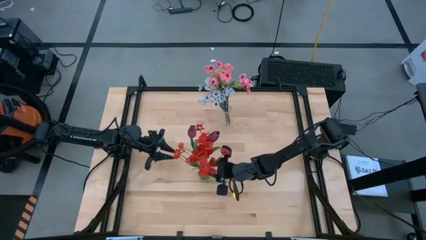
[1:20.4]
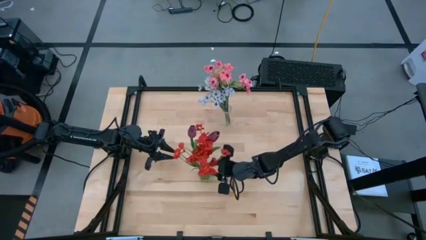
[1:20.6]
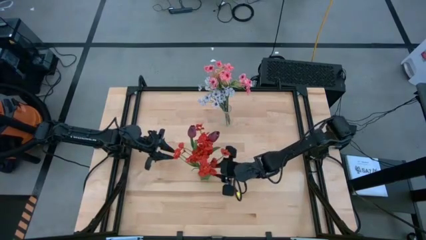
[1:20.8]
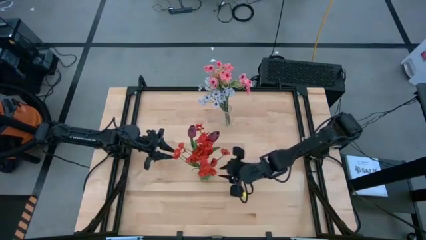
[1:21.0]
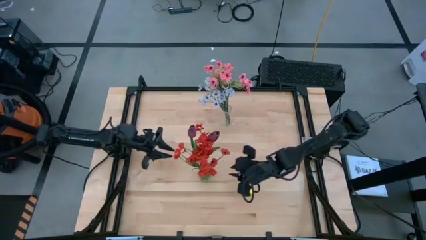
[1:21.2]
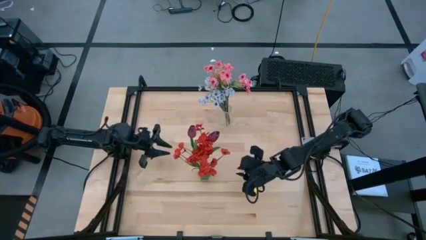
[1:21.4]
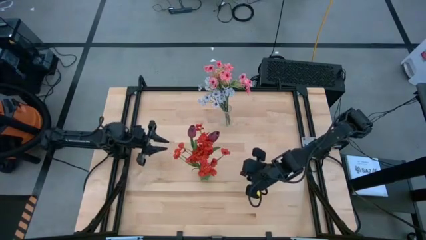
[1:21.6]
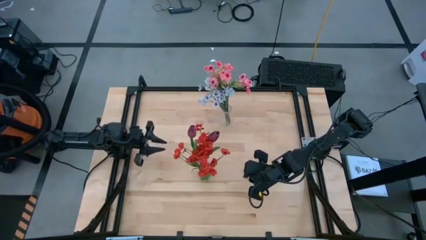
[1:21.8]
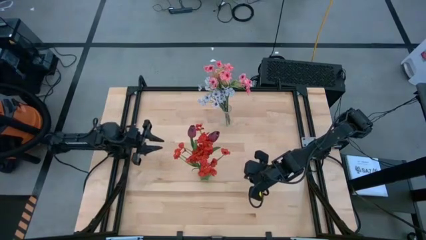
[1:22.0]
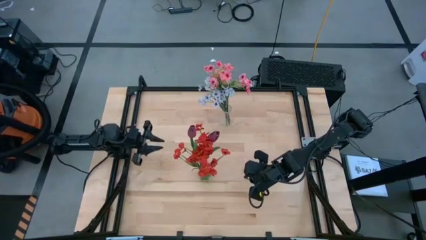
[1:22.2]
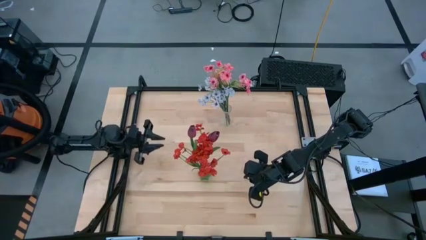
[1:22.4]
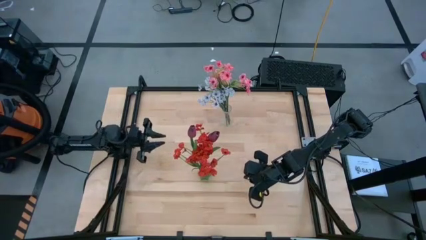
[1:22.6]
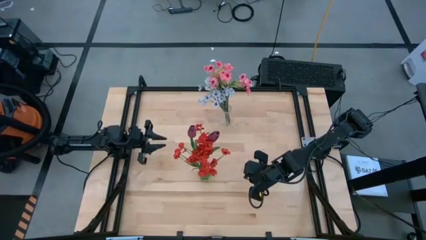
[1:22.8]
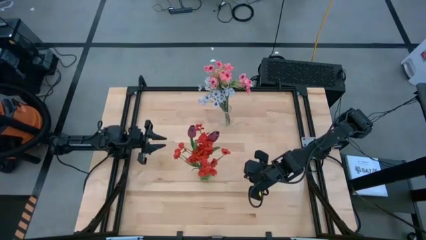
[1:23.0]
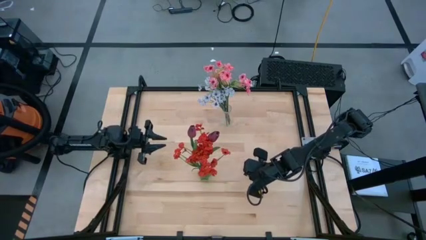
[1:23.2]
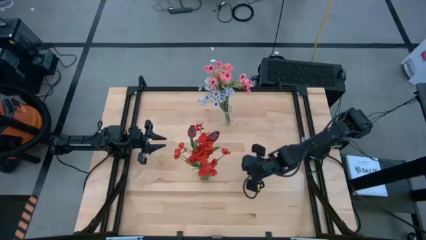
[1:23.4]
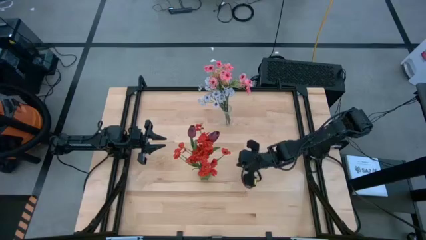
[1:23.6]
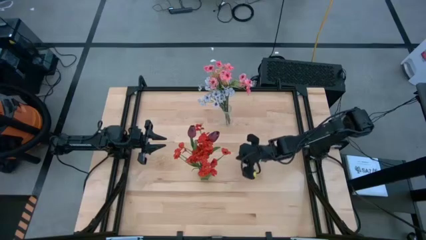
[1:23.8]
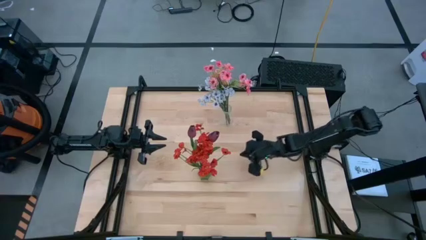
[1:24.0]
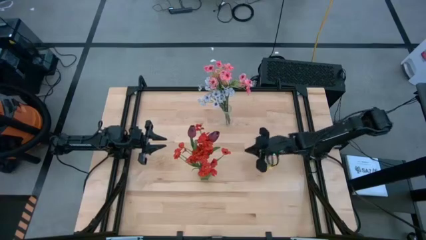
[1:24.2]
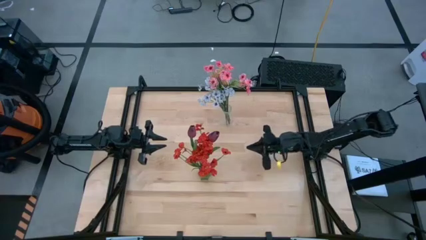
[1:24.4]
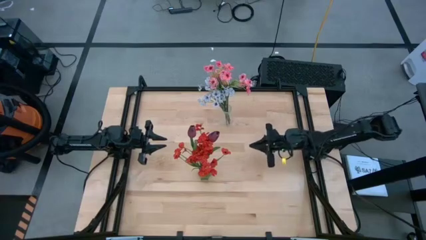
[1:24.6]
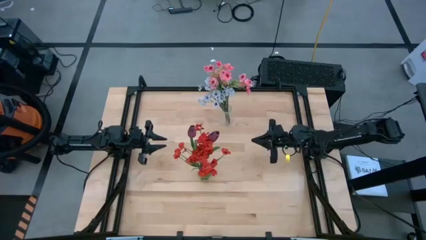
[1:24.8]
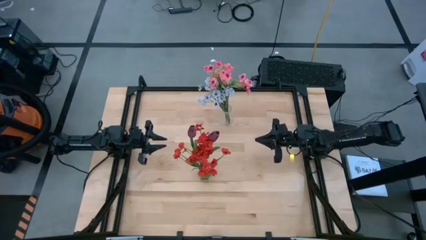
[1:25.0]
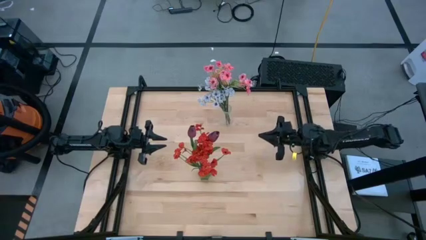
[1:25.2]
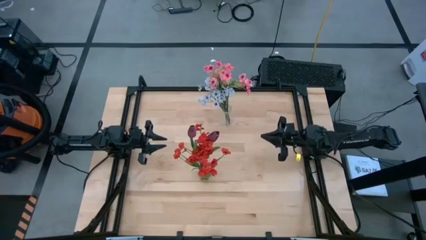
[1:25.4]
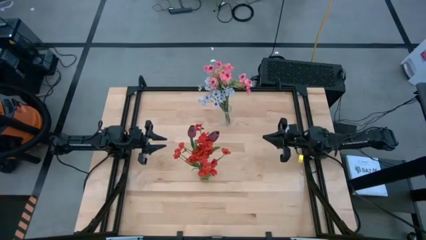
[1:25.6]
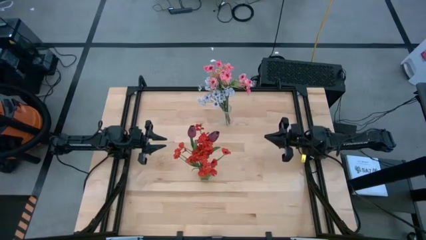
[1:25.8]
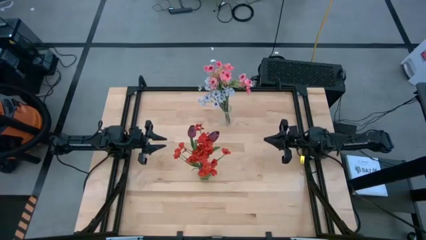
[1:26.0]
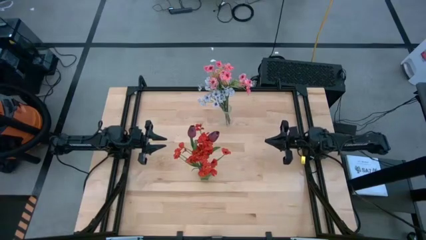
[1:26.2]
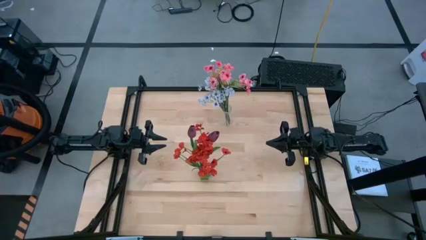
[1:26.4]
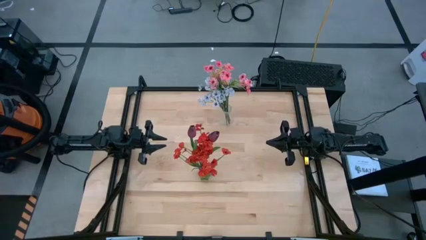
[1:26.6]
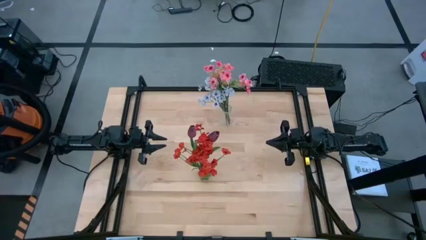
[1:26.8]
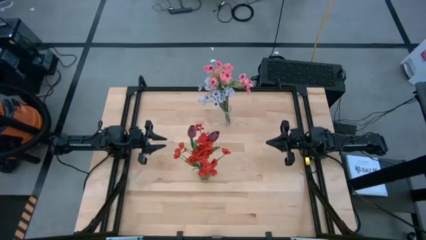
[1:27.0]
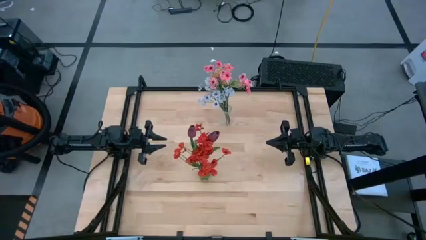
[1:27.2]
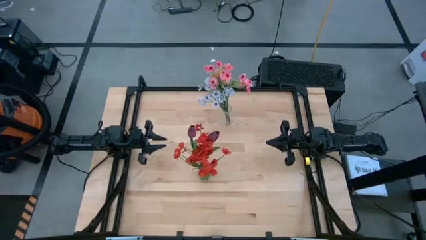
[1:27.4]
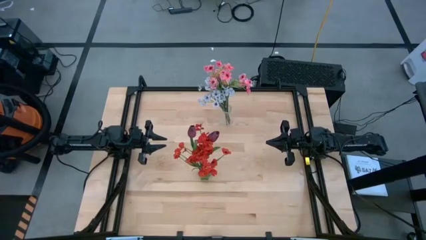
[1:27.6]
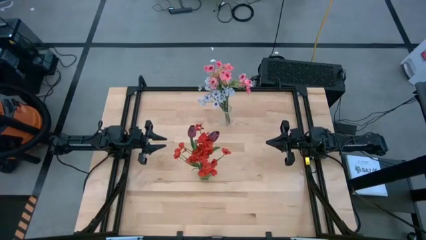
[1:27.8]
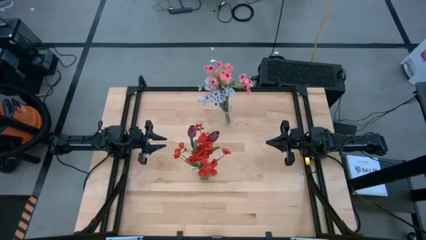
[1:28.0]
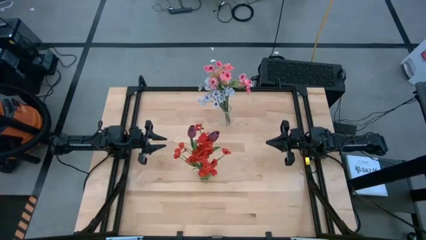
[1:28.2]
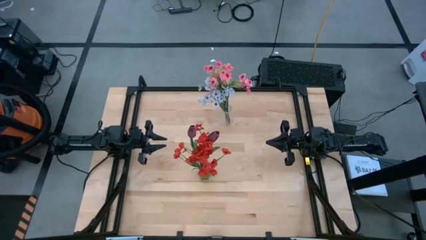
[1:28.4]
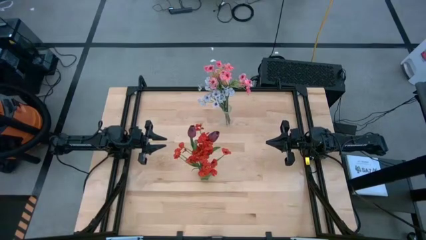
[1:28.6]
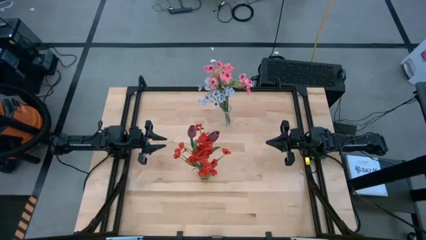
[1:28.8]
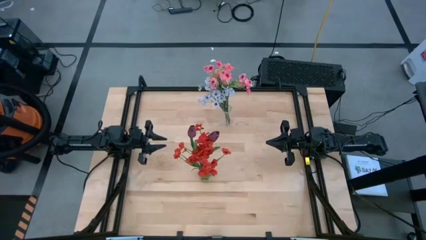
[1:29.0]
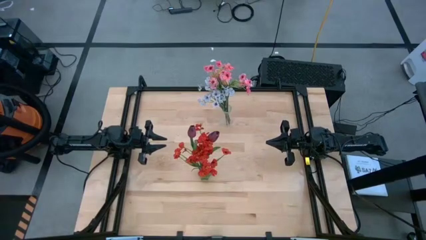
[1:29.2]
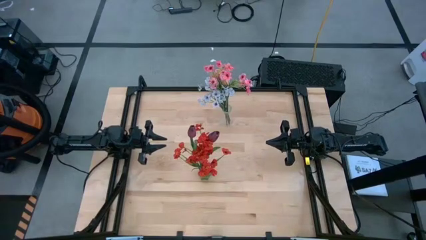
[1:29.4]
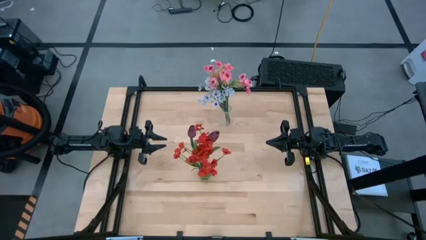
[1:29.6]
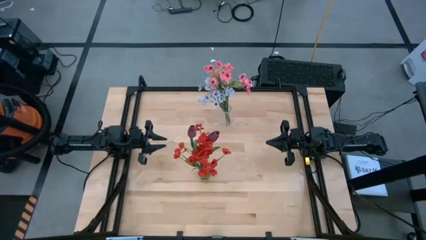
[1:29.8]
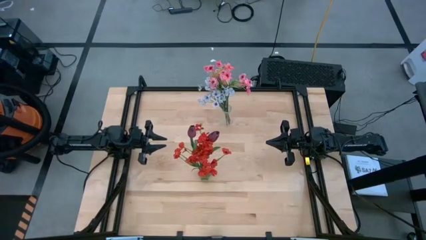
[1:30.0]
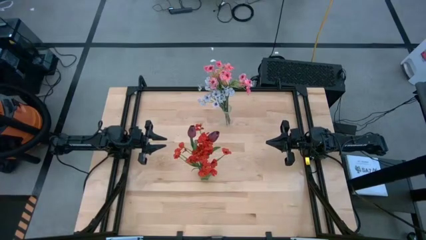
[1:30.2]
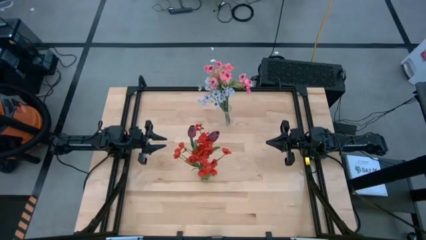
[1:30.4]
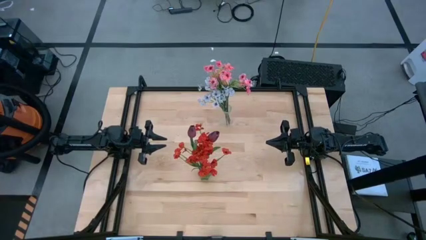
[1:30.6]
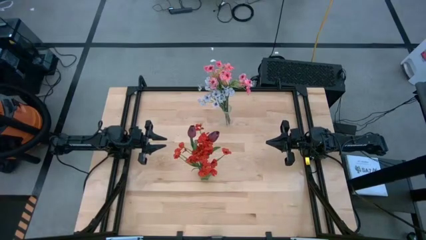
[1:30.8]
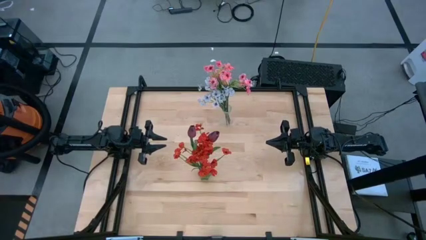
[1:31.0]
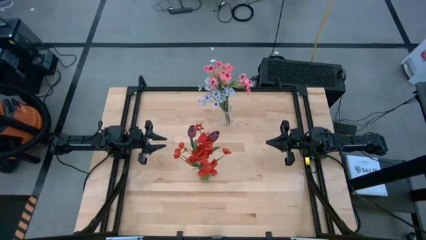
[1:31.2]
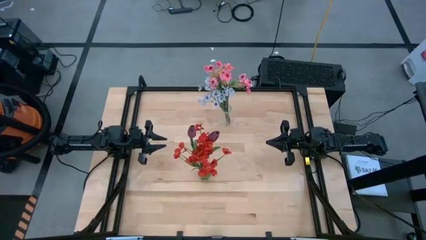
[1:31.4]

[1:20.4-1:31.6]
Task: Sort flowers into vase by color
Return to Home Position
